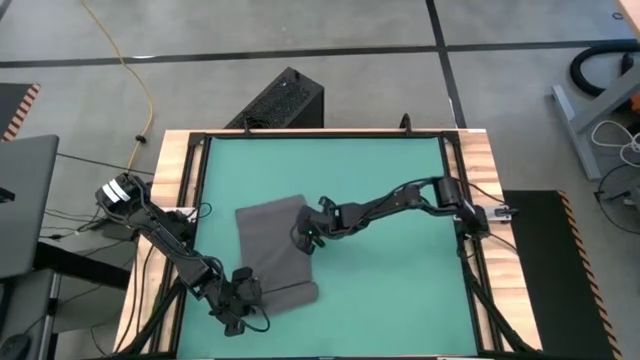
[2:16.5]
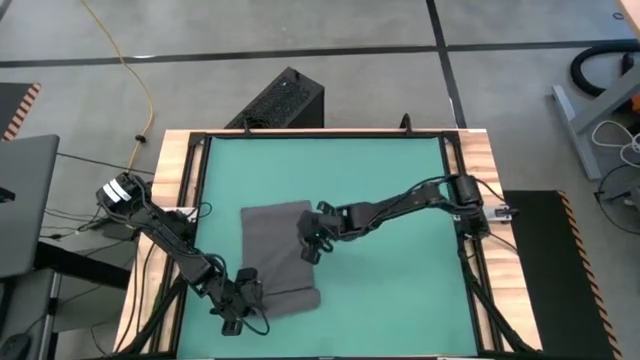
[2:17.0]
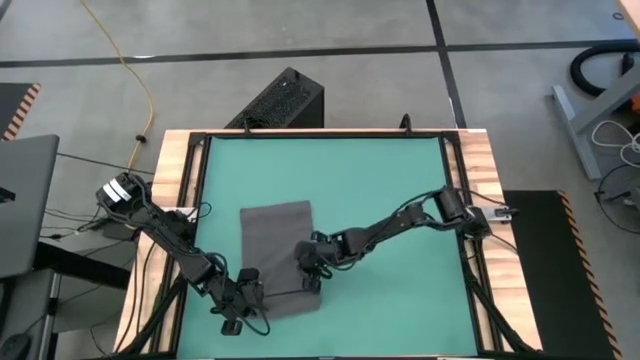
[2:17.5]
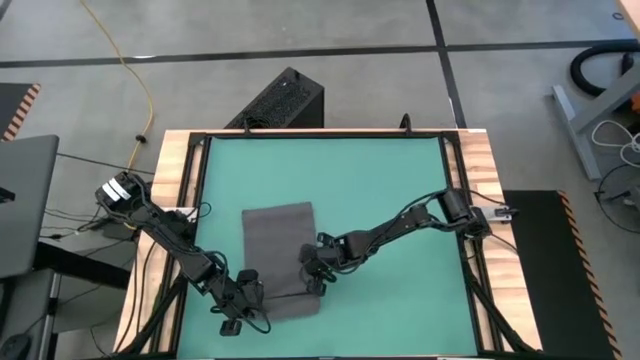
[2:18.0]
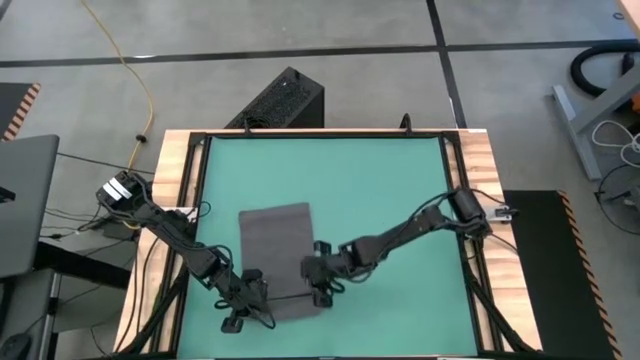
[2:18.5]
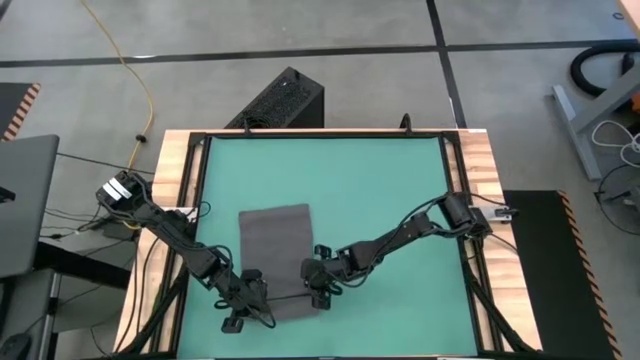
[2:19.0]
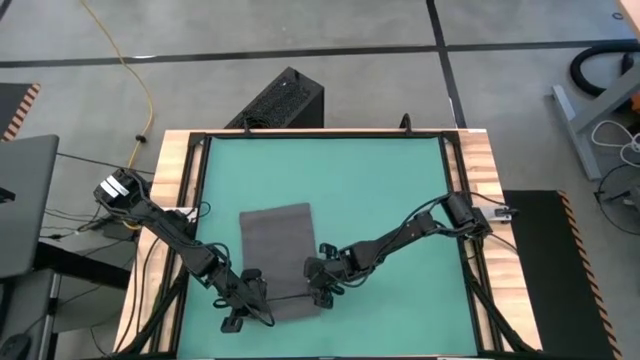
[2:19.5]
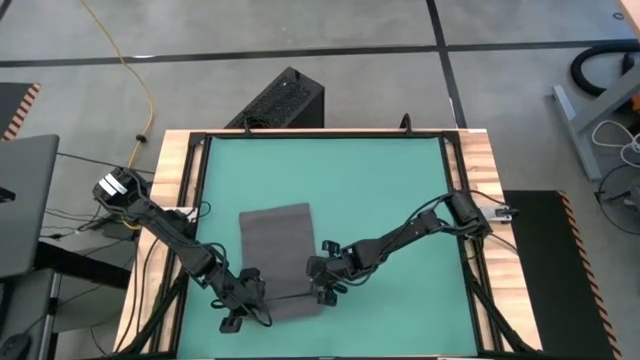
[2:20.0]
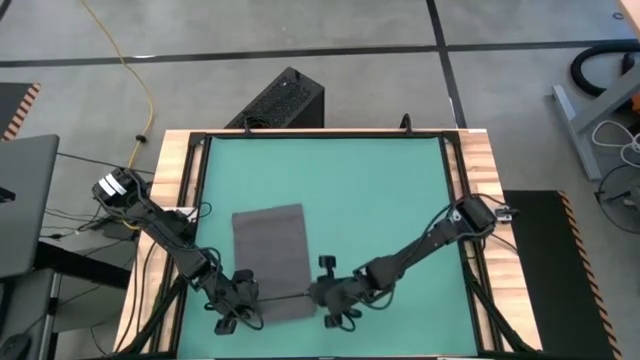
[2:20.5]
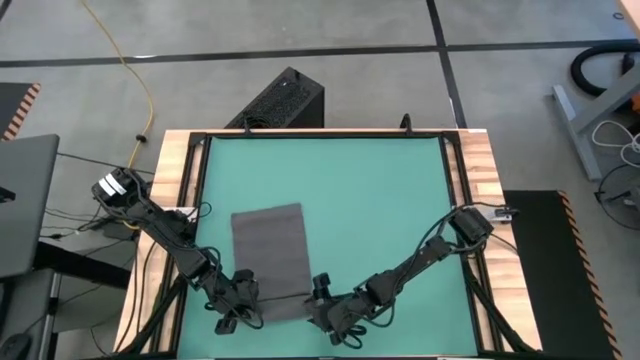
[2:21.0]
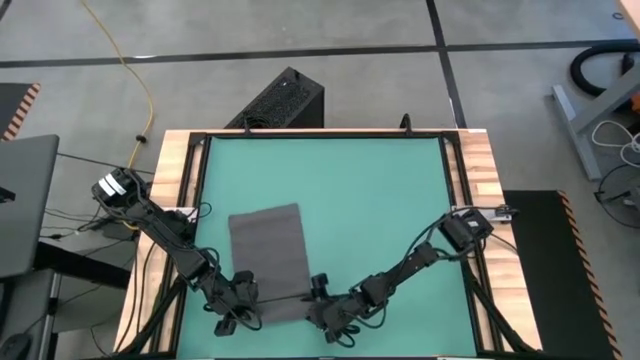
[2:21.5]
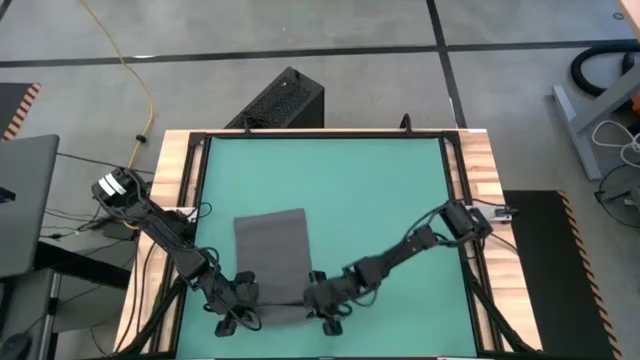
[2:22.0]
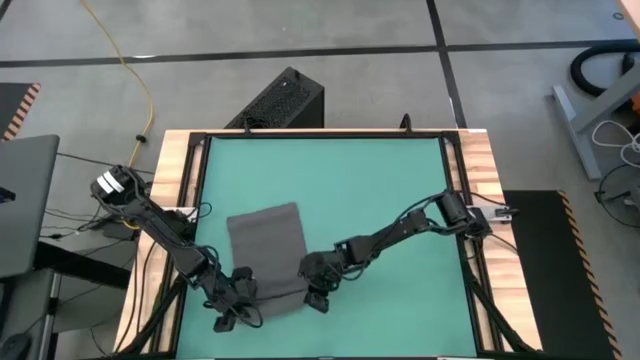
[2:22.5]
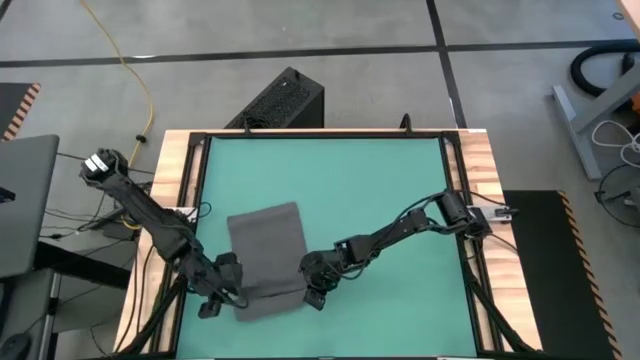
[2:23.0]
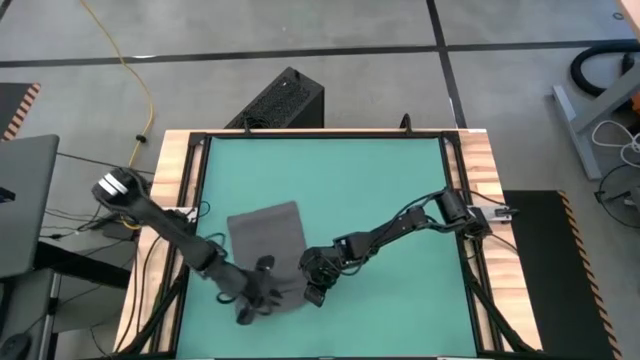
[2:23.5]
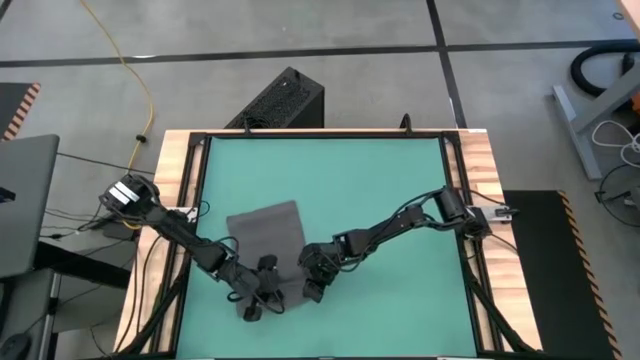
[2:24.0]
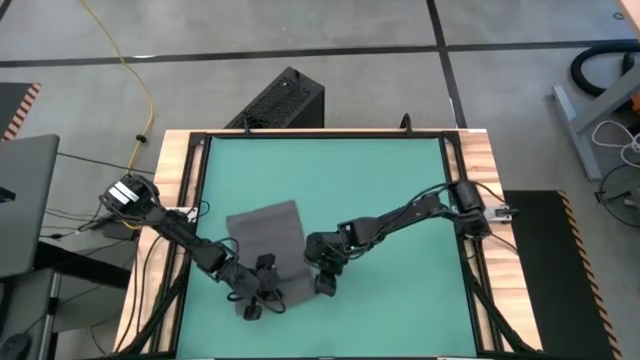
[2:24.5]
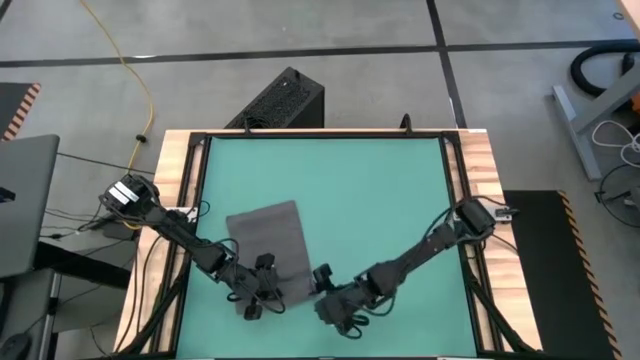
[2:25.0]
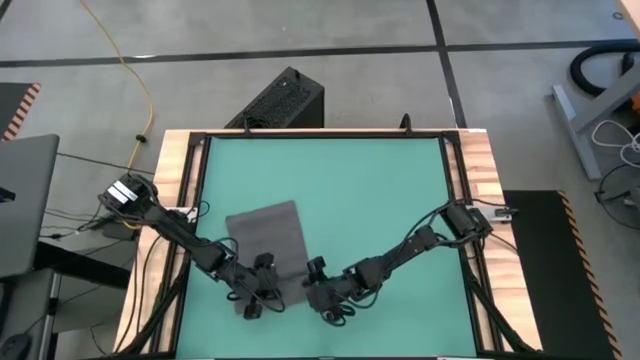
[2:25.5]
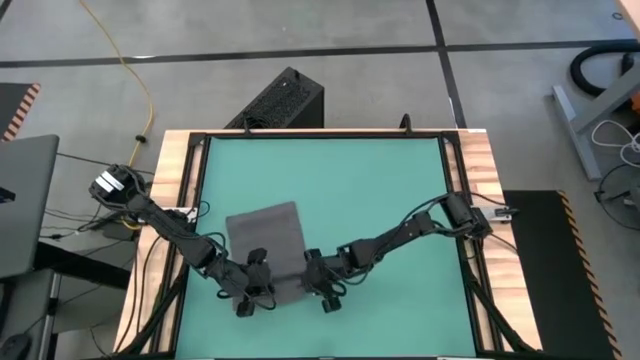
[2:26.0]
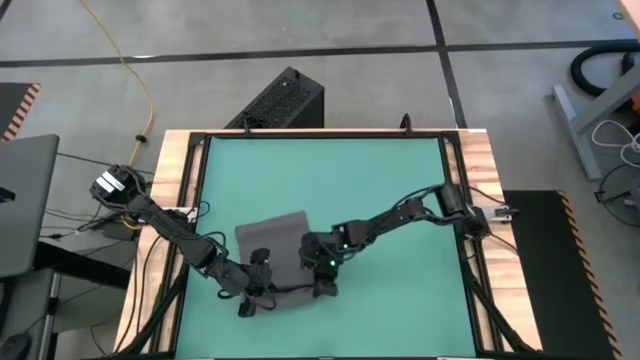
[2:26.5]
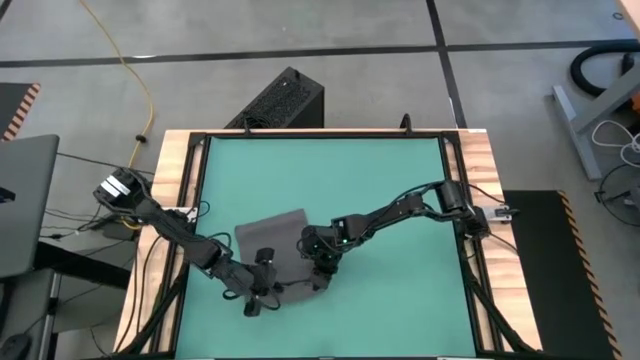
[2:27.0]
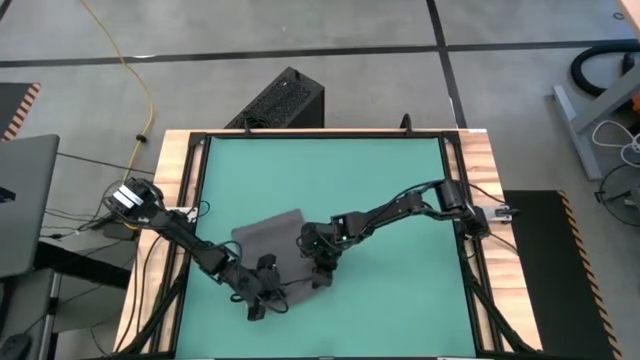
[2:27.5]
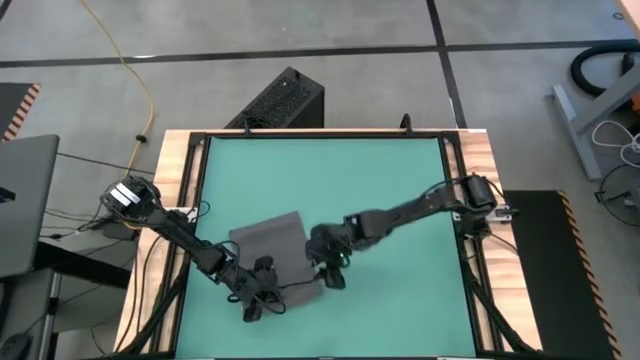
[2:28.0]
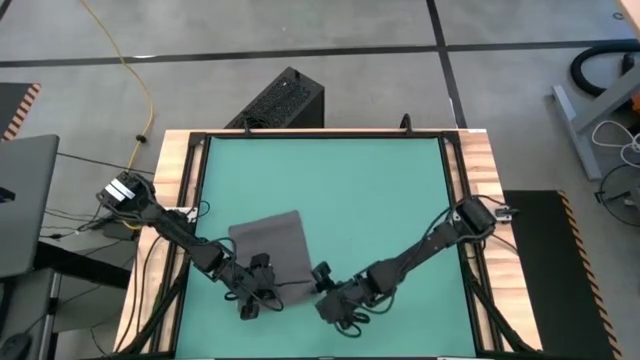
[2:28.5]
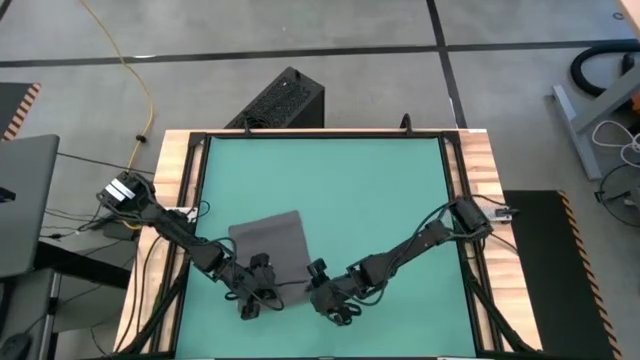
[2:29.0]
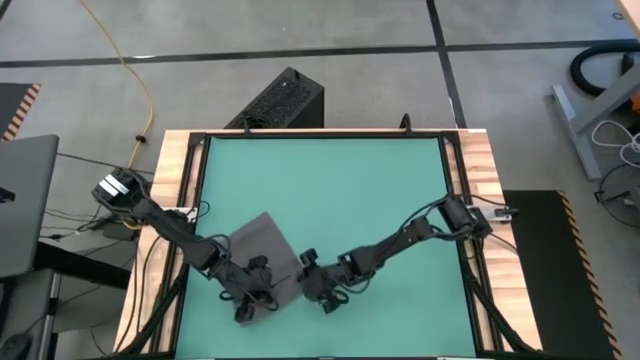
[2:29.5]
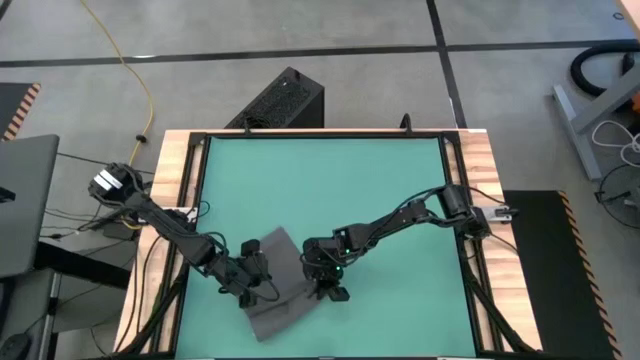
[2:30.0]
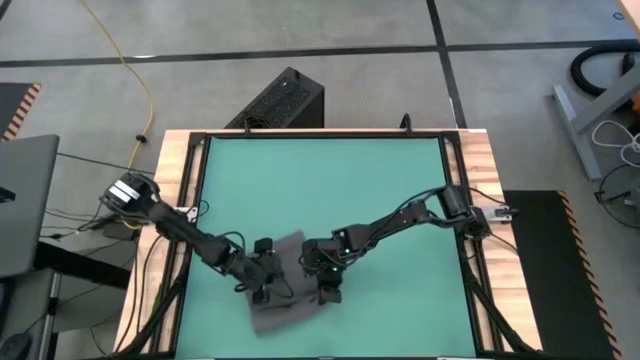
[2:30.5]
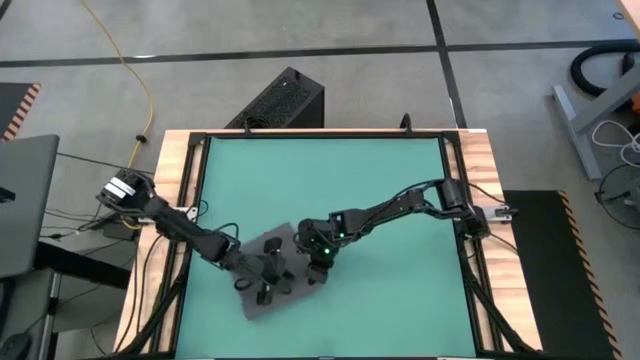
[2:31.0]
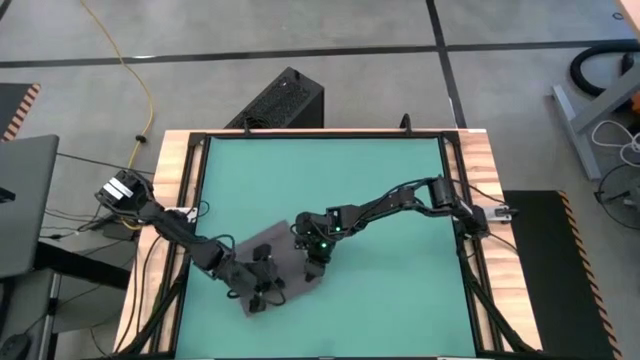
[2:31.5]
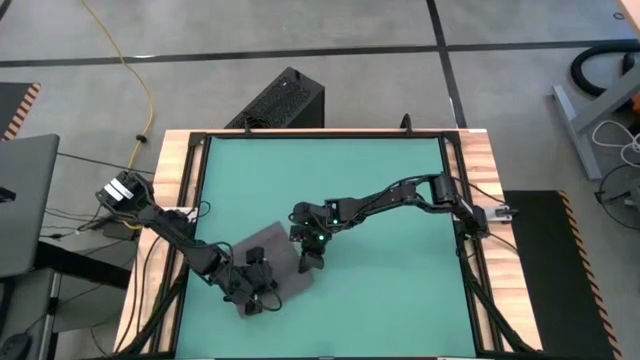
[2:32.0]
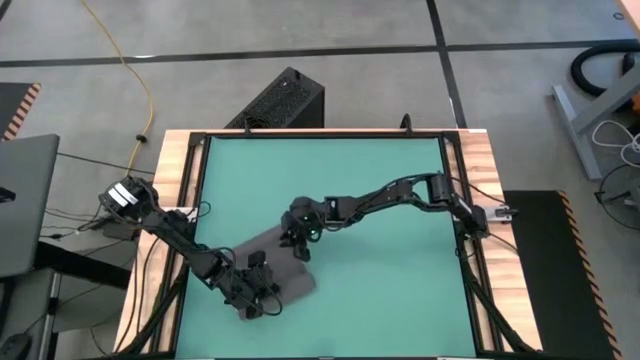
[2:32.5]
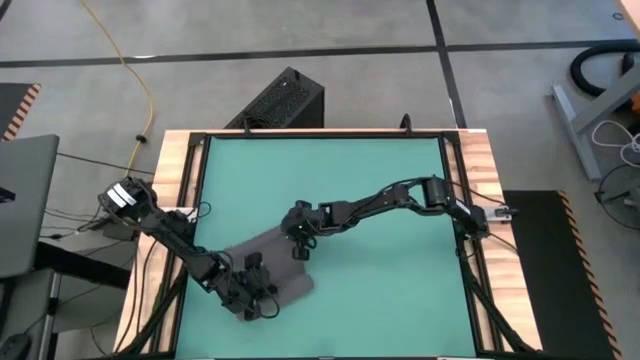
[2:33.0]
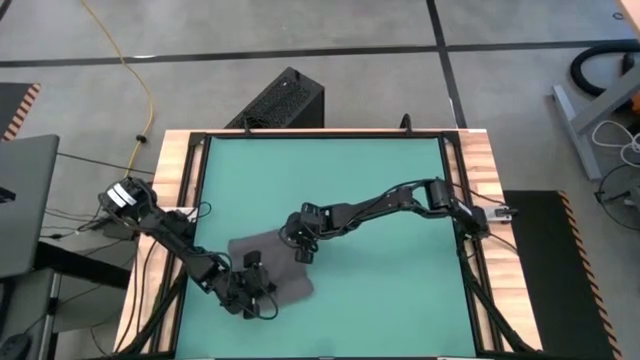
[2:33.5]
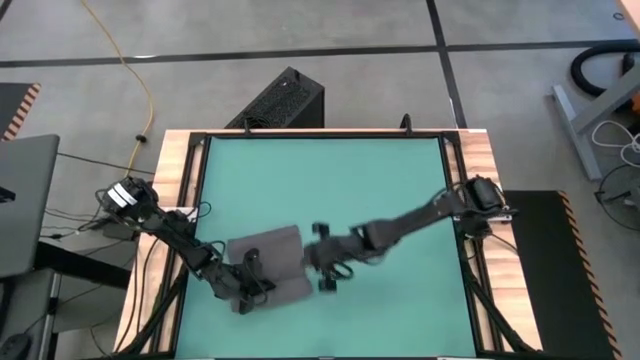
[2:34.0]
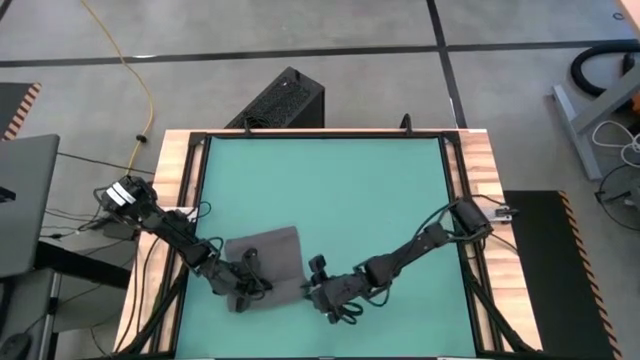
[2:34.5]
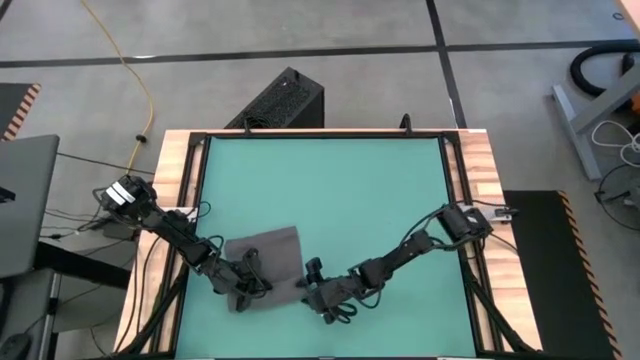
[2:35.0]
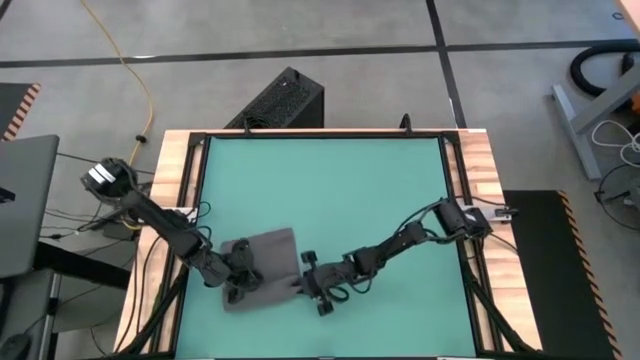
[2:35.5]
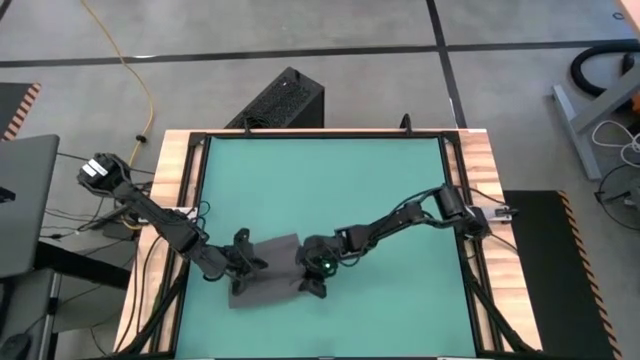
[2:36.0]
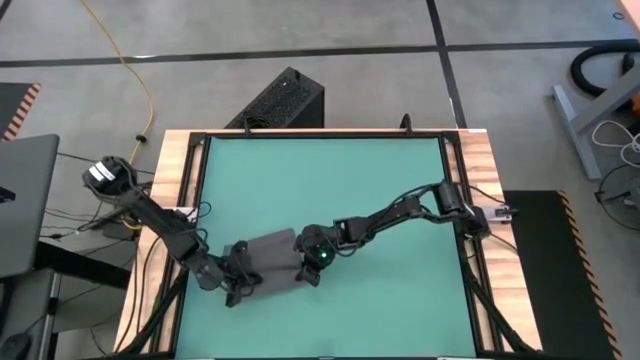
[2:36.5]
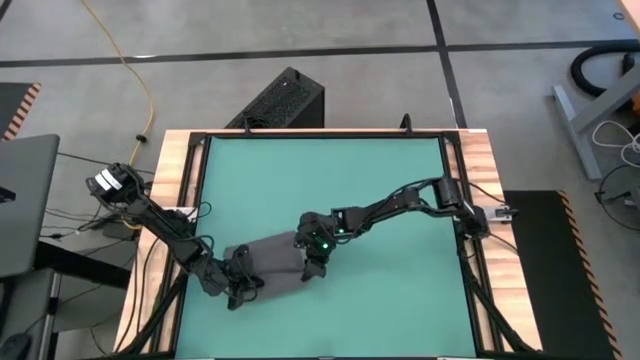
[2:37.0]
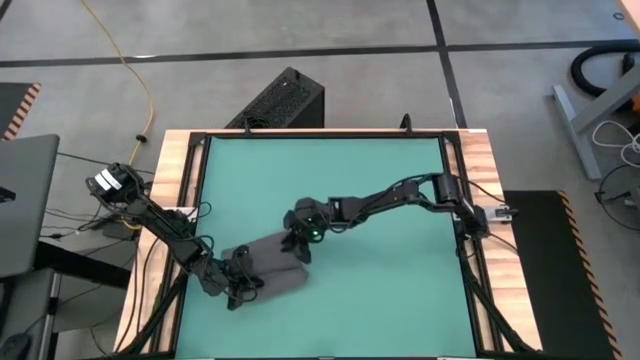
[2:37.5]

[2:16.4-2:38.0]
Task: Roll towel
Roll the gray towel

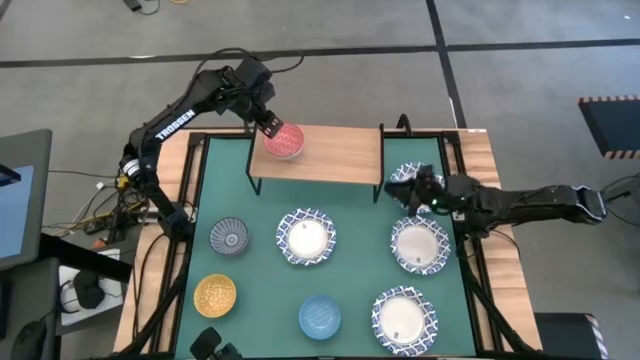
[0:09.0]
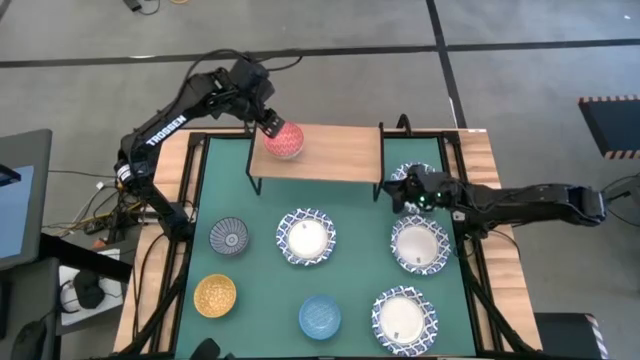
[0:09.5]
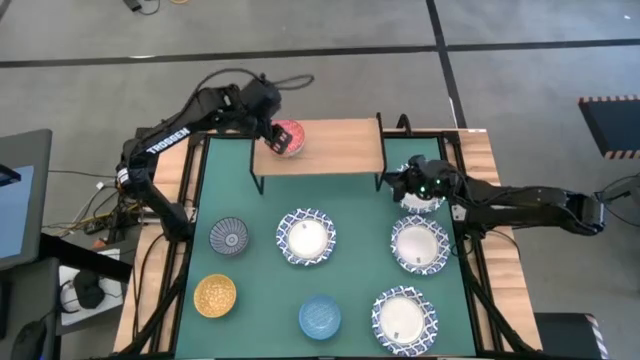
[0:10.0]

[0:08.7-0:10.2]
Task: Place and stack bowls onto a shelf
Adjust the shelf
